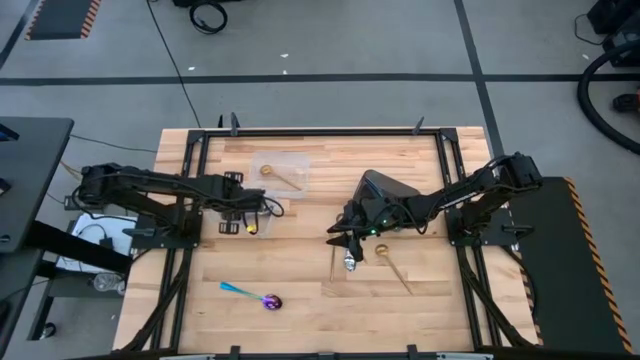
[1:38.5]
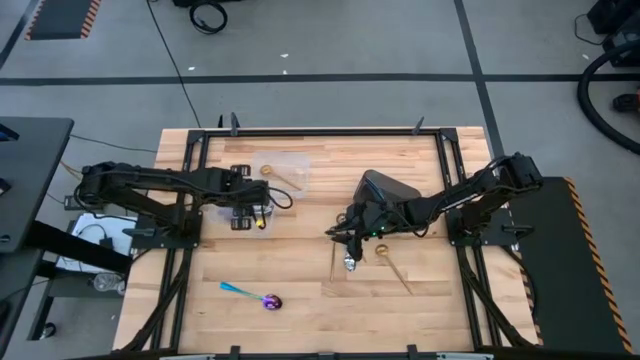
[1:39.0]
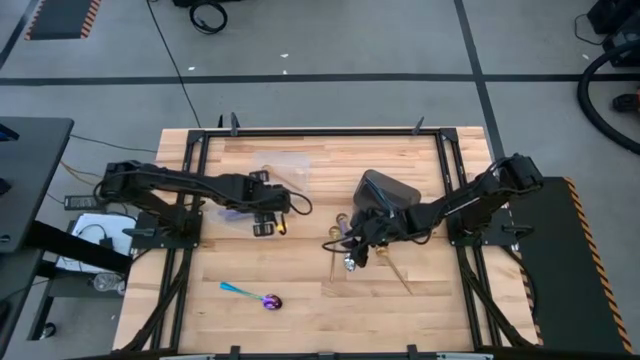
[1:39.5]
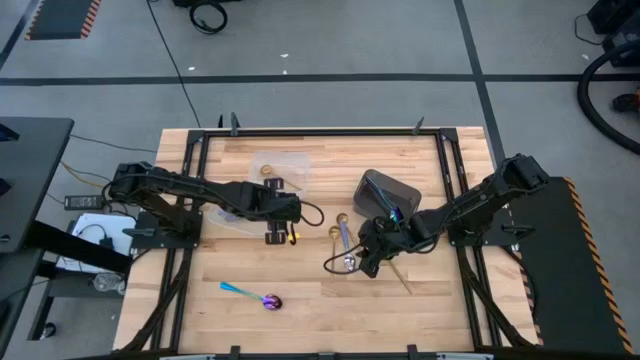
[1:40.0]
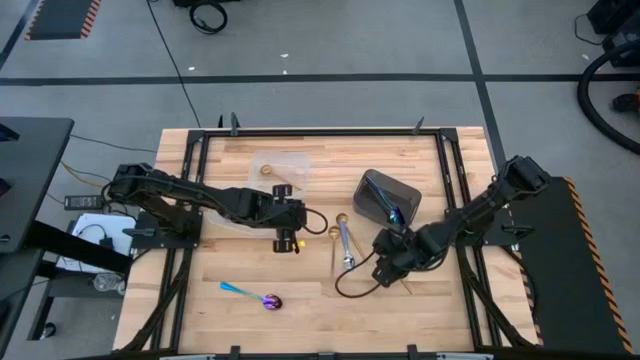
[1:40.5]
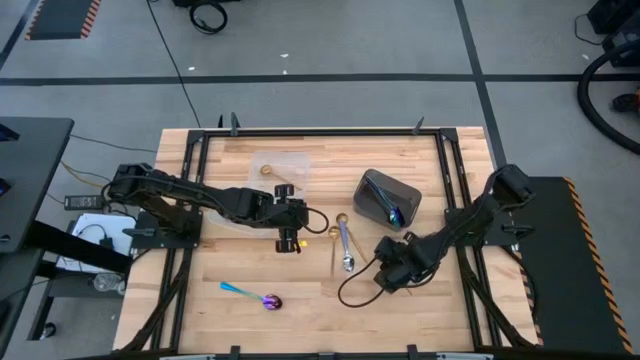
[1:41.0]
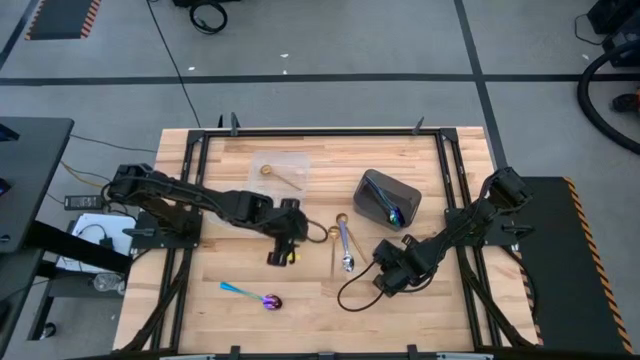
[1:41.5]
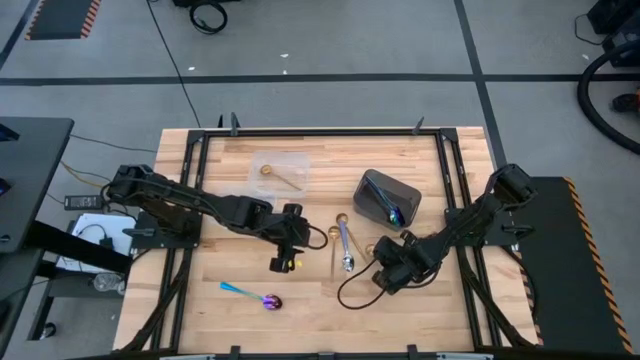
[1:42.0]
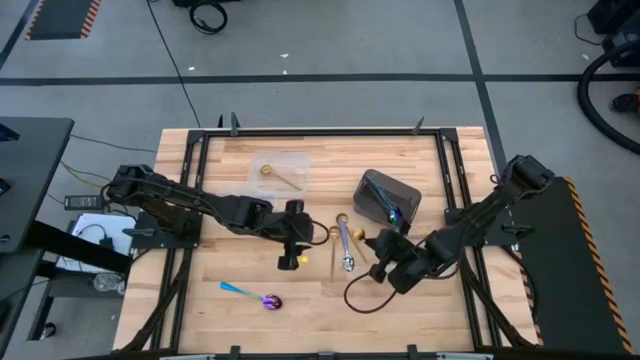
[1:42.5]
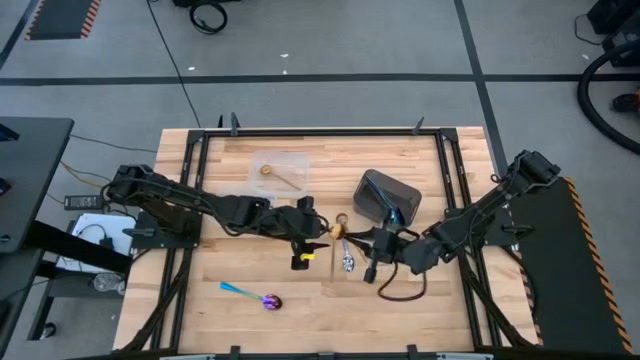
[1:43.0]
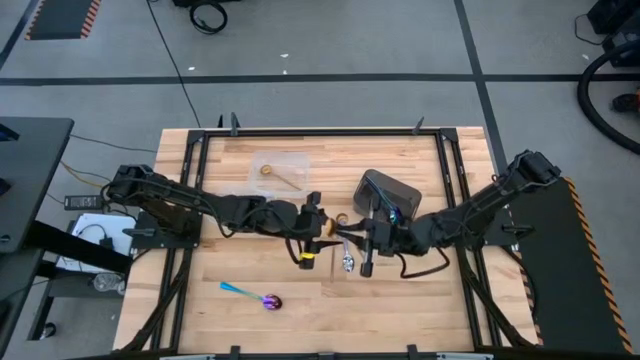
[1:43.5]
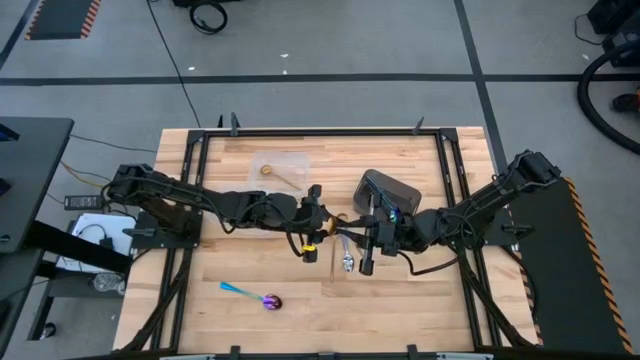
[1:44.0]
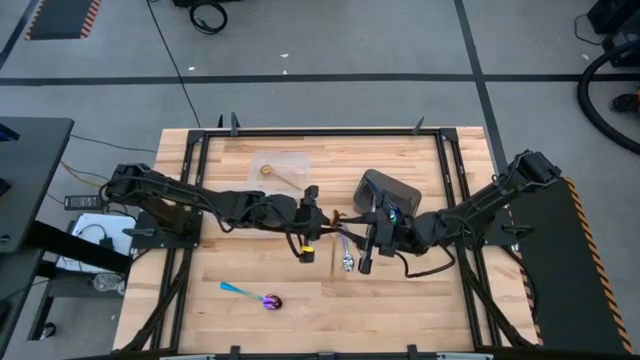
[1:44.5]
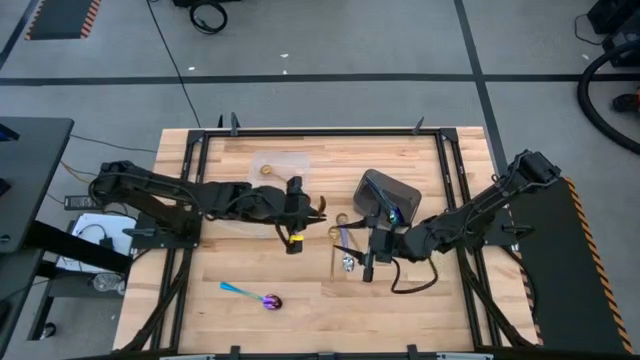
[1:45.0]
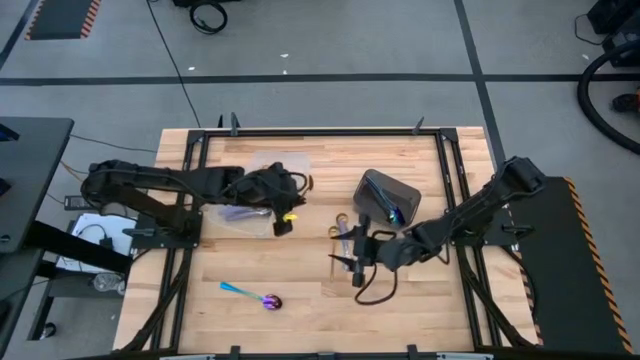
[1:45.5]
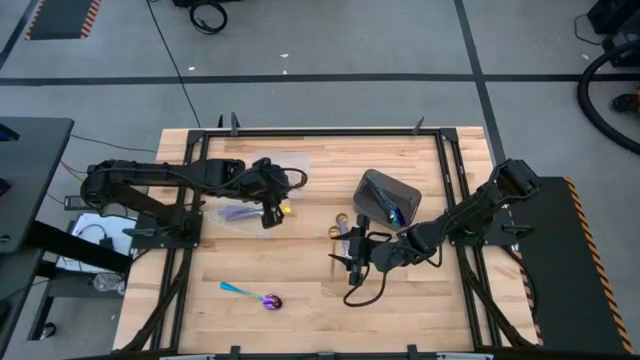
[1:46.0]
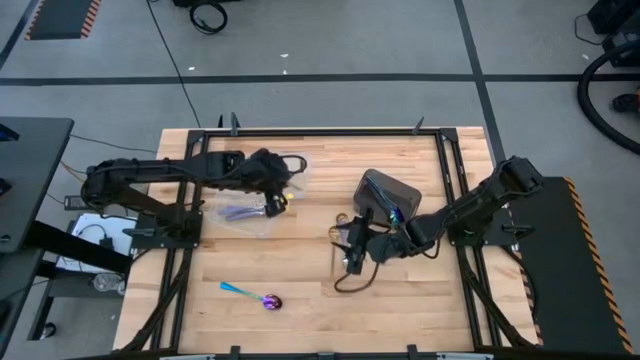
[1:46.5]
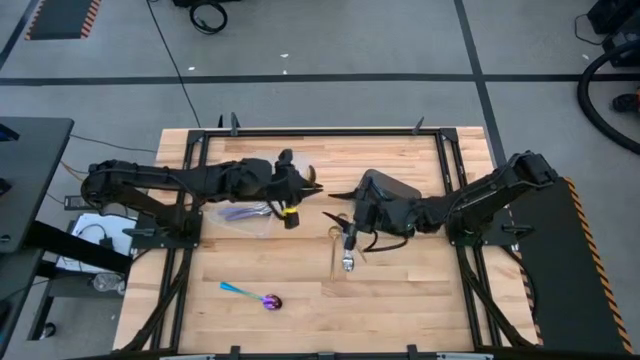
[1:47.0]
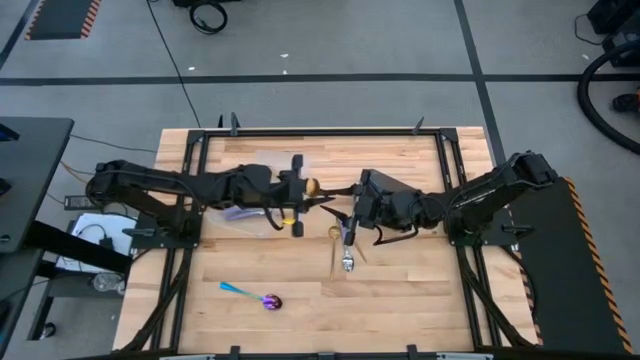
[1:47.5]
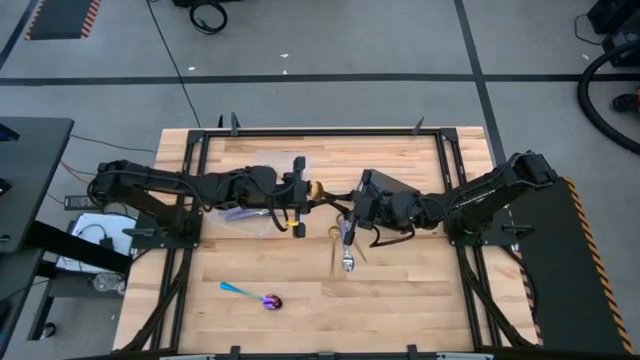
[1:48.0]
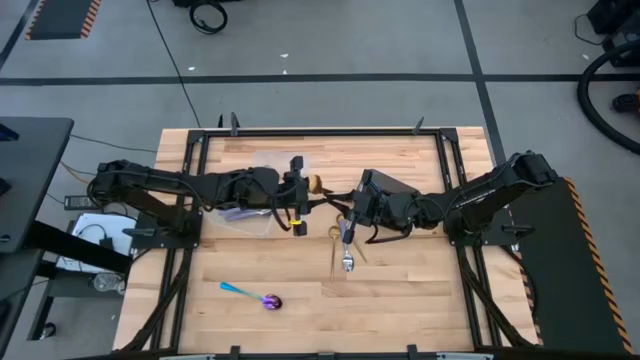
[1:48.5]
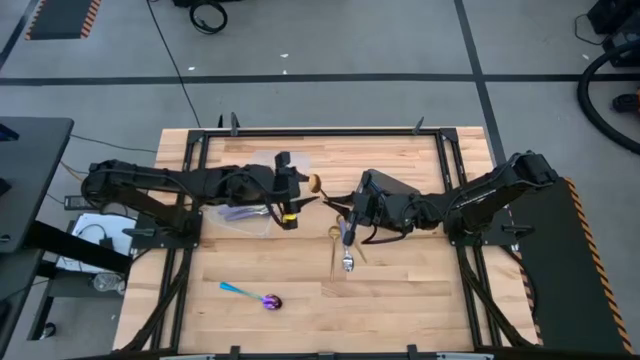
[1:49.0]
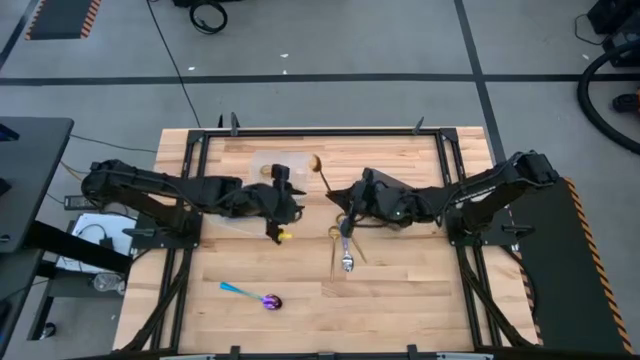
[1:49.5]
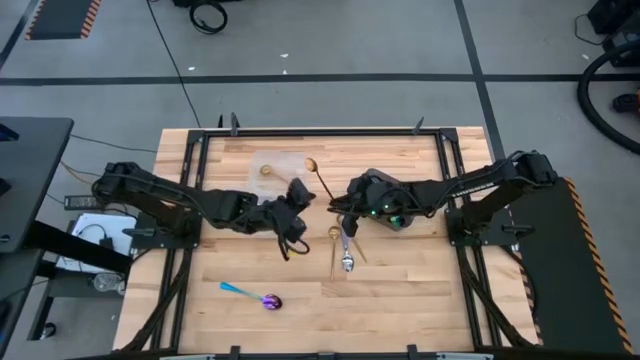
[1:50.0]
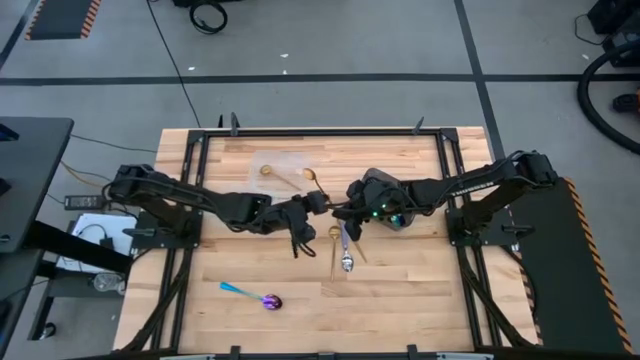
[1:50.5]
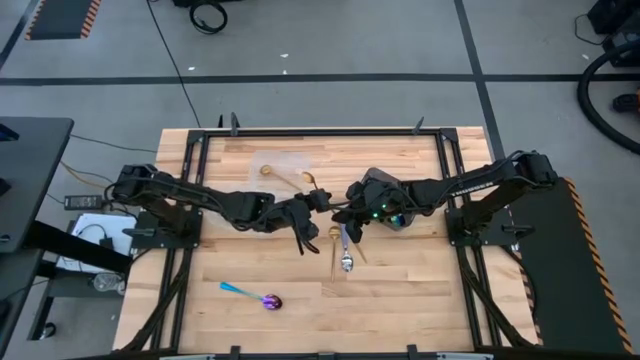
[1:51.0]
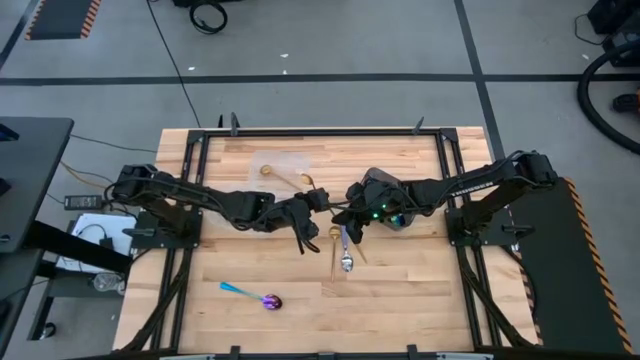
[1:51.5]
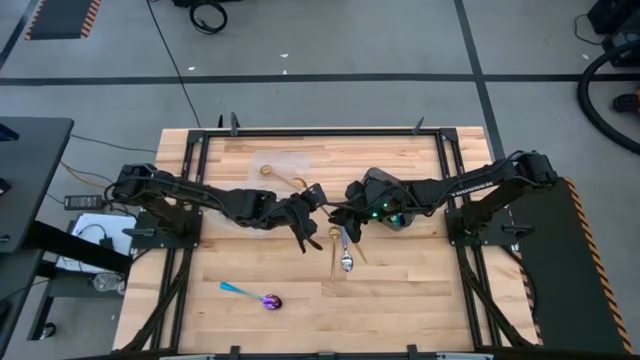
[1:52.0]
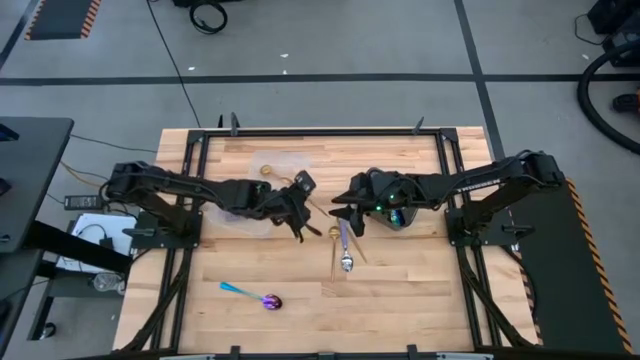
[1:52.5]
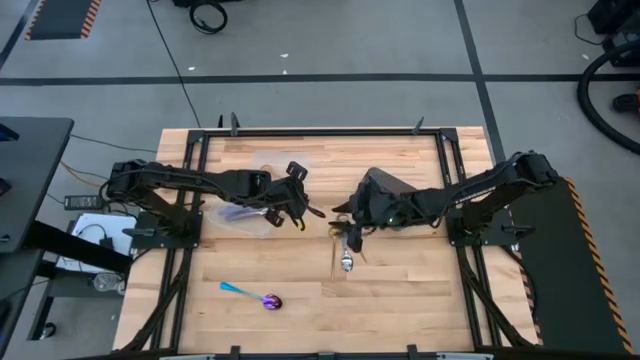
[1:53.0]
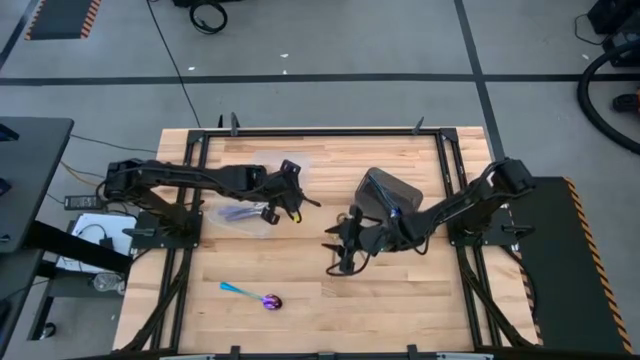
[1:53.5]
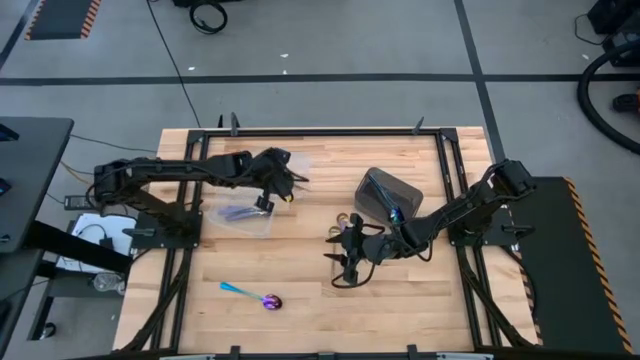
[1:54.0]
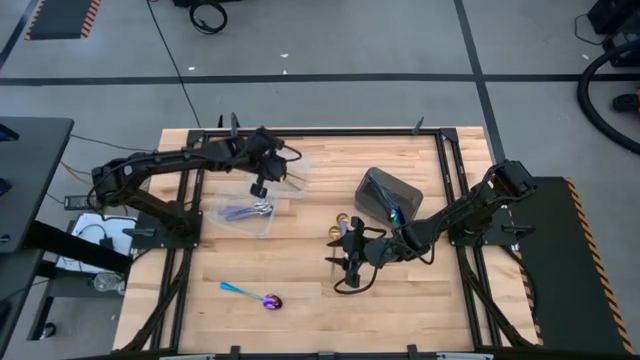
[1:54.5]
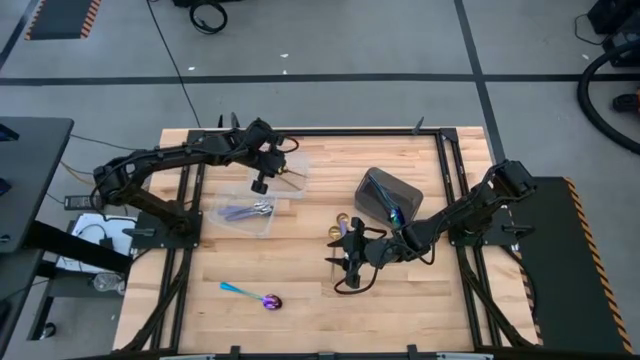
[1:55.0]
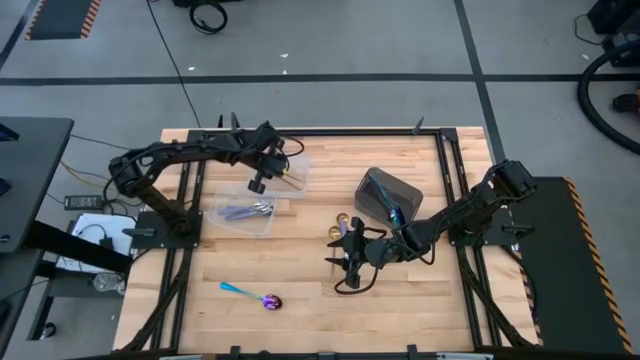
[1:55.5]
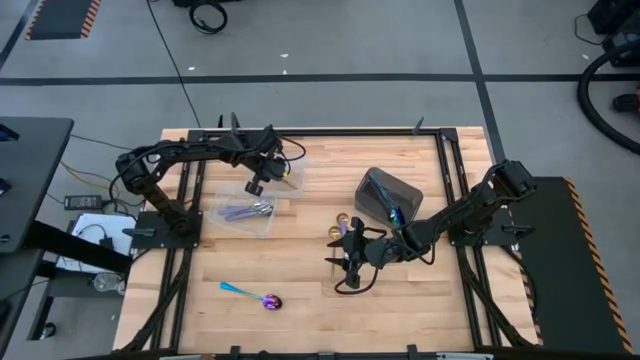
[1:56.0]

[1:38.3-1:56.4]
Task: Sort silverware by color (type)
Put the gold spoon into the top transparent bin

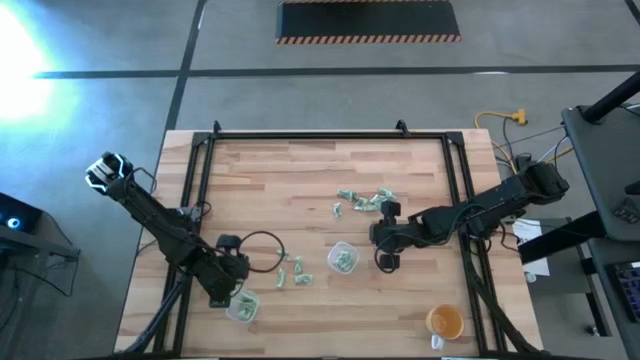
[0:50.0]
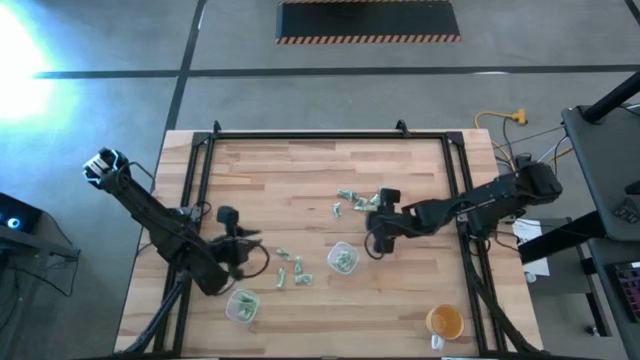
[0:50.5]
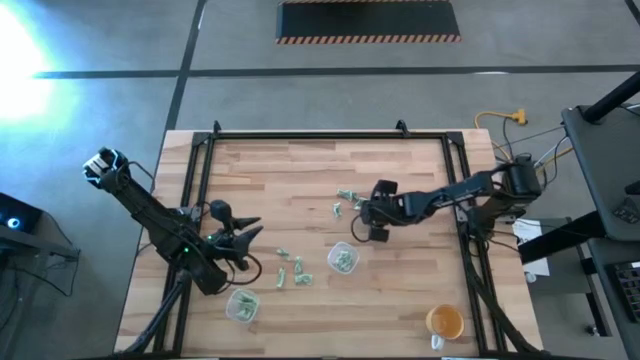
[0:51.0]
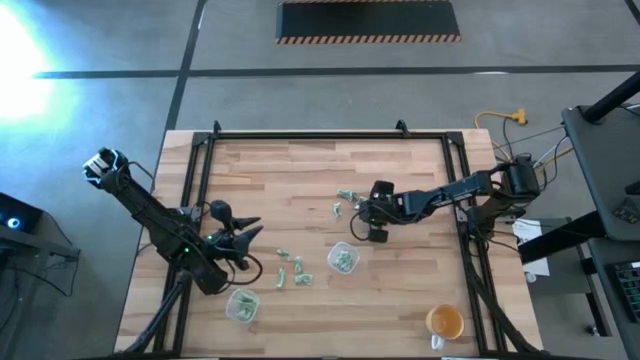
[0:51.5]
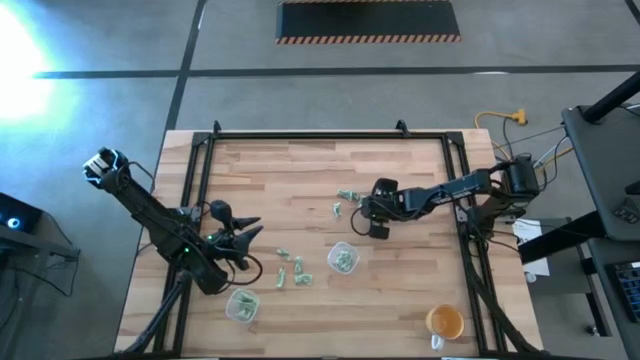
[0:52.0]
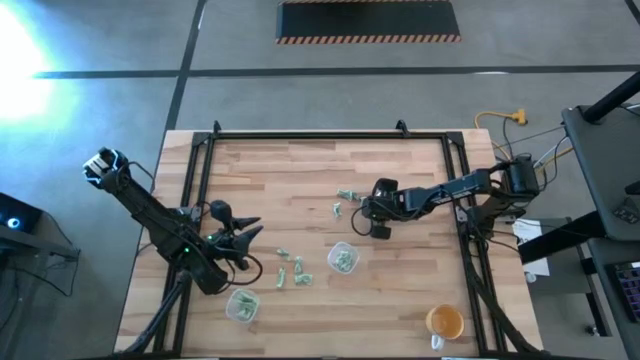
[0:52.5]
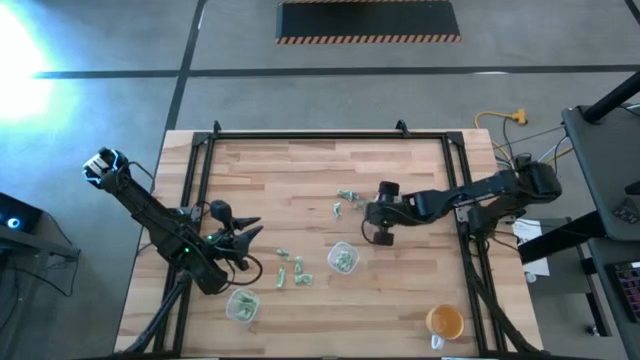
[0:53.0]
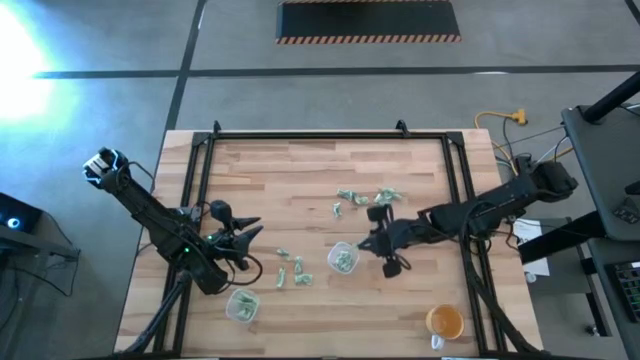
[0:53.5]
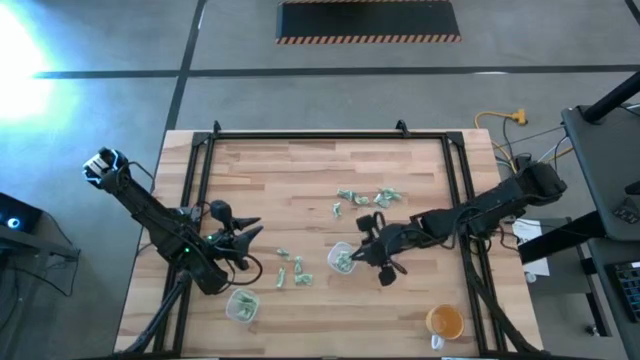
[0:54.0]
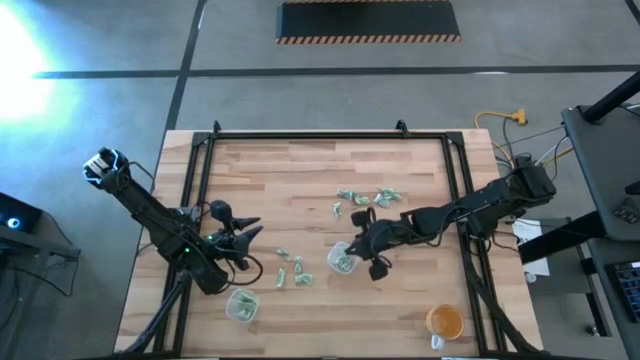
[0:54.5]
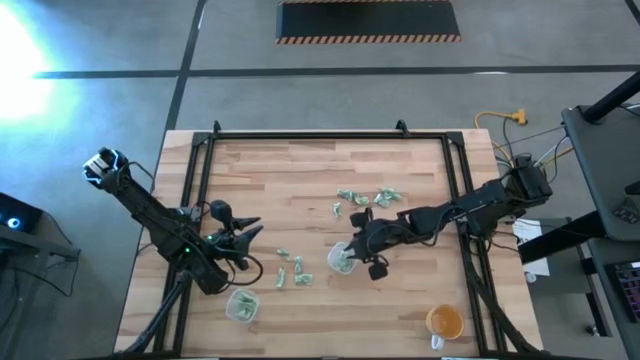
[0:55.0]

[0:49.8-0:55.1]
Task: Pick and place items into bin
Put the light green packet into the top transparent bin
